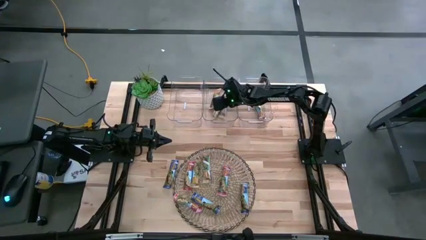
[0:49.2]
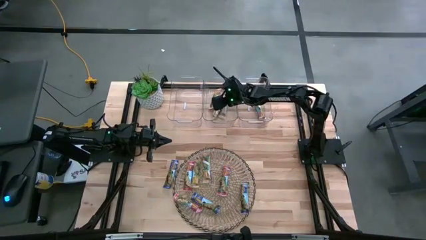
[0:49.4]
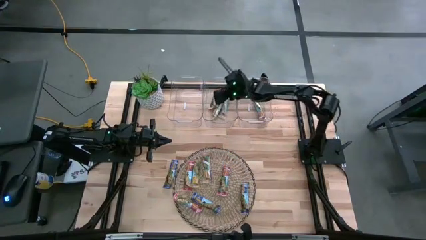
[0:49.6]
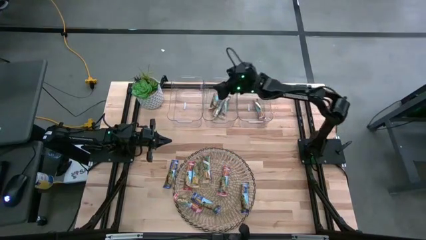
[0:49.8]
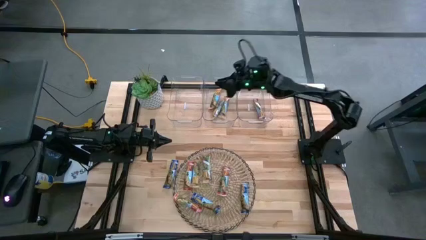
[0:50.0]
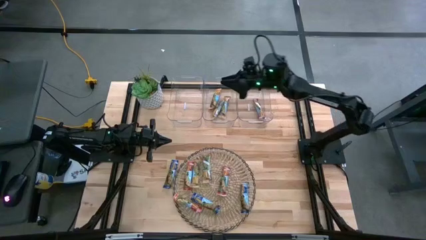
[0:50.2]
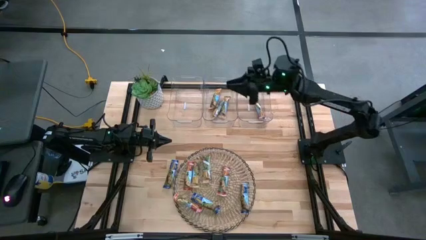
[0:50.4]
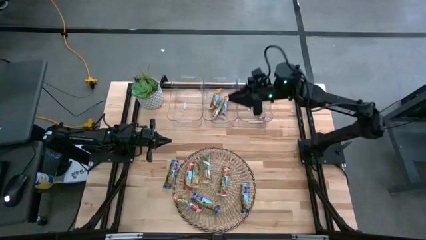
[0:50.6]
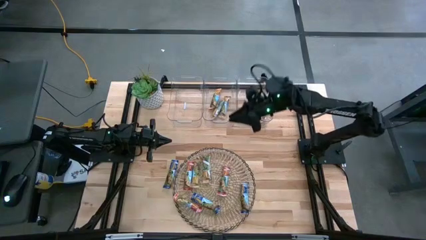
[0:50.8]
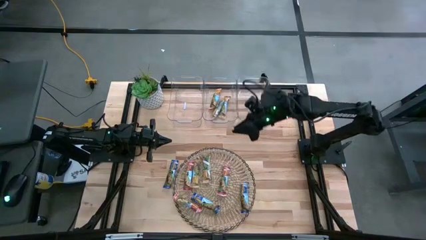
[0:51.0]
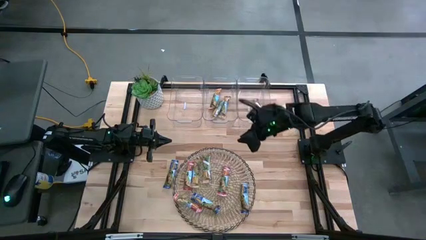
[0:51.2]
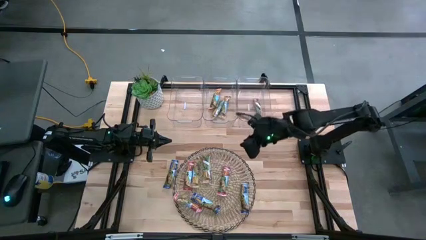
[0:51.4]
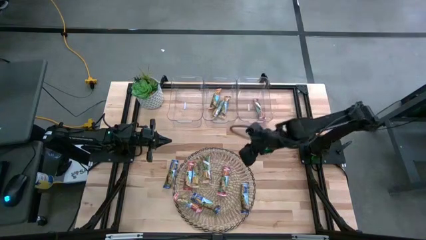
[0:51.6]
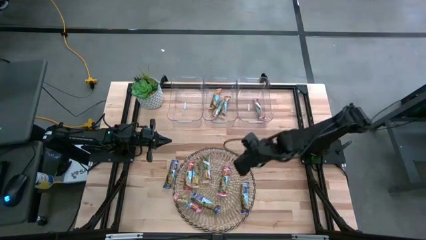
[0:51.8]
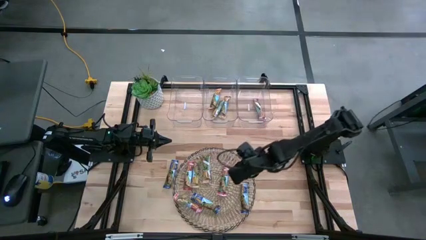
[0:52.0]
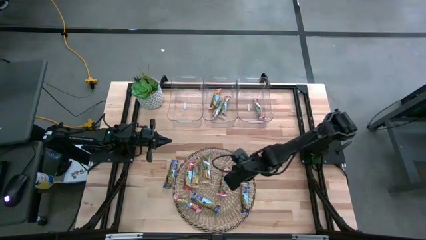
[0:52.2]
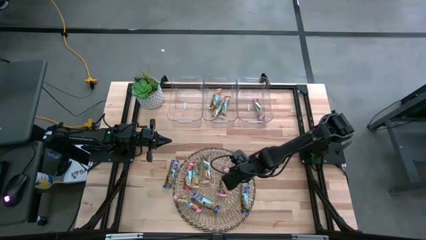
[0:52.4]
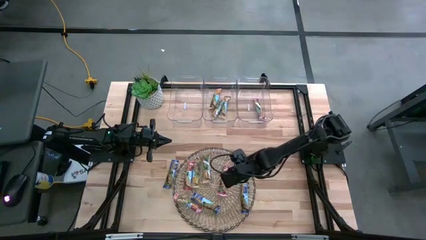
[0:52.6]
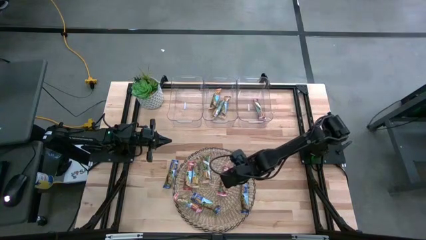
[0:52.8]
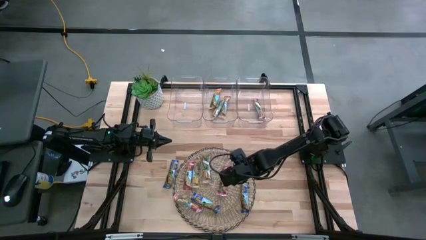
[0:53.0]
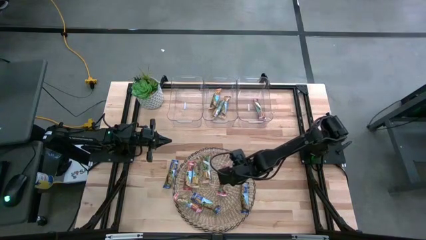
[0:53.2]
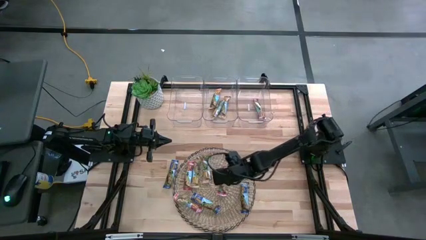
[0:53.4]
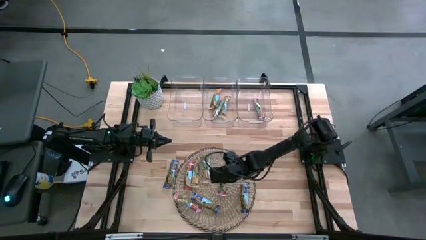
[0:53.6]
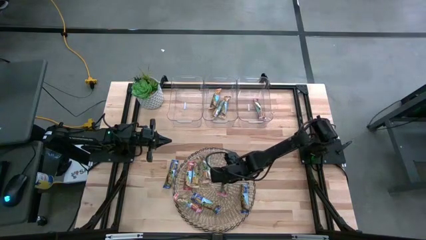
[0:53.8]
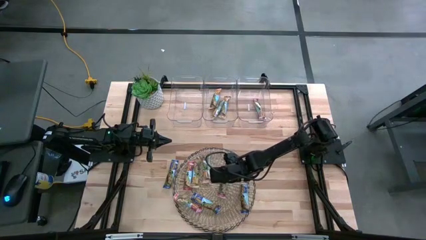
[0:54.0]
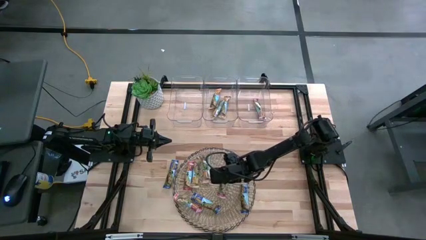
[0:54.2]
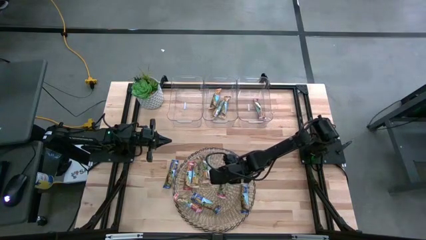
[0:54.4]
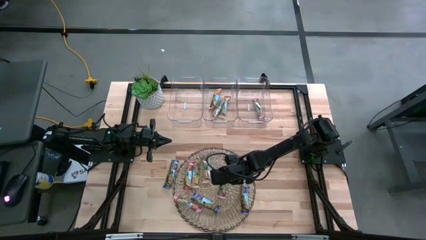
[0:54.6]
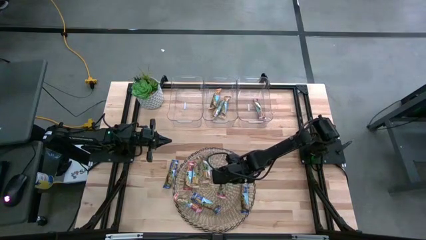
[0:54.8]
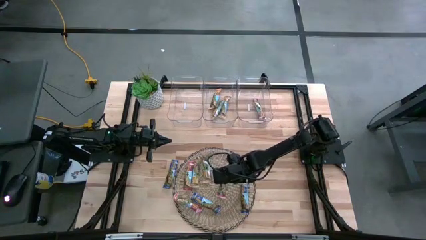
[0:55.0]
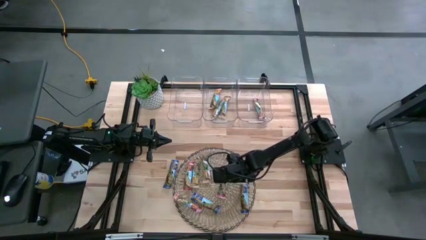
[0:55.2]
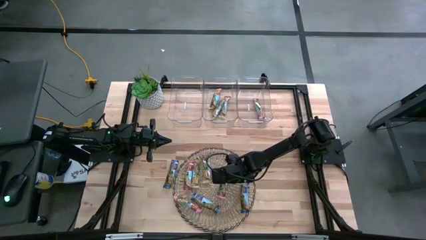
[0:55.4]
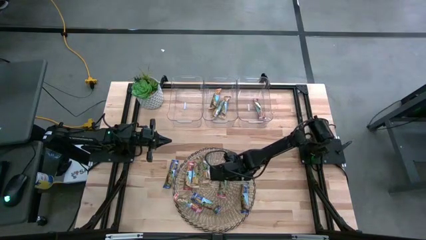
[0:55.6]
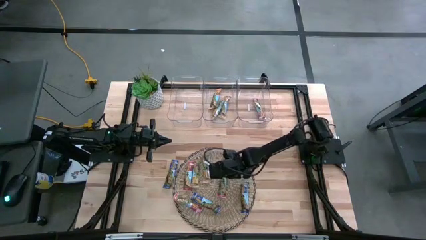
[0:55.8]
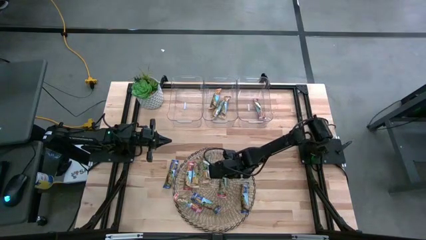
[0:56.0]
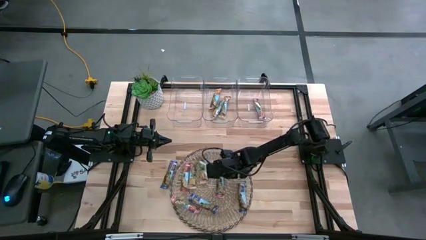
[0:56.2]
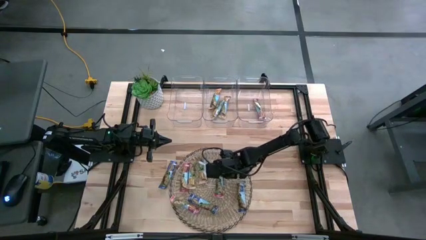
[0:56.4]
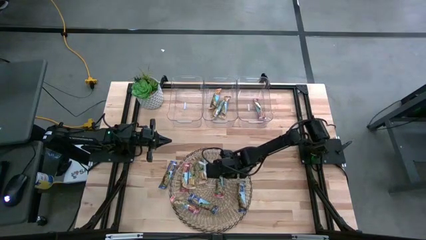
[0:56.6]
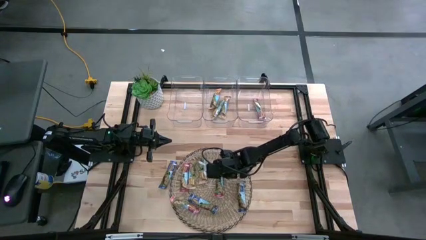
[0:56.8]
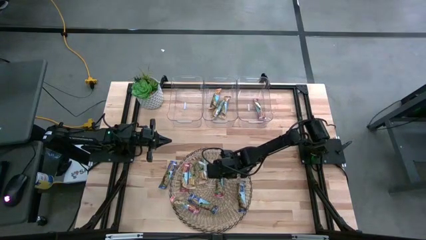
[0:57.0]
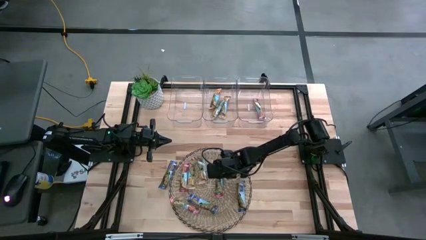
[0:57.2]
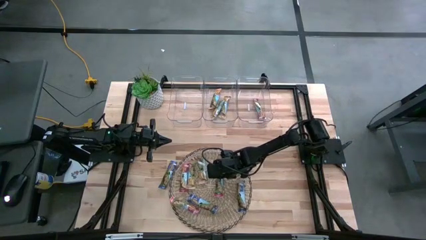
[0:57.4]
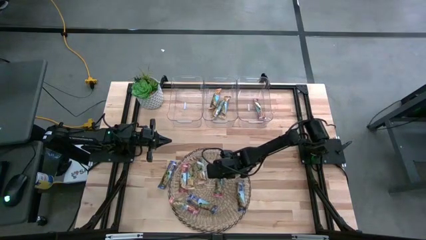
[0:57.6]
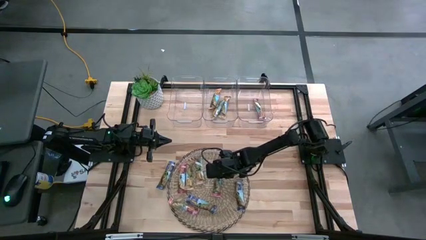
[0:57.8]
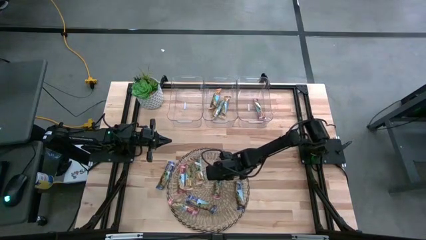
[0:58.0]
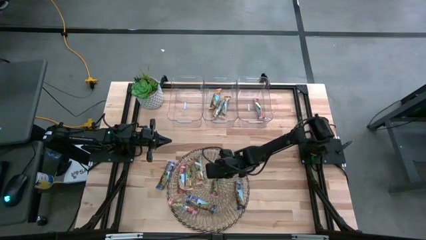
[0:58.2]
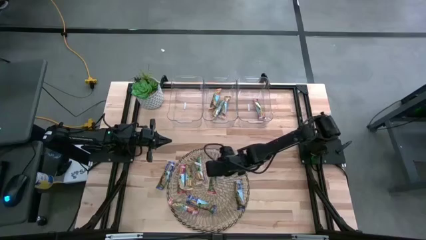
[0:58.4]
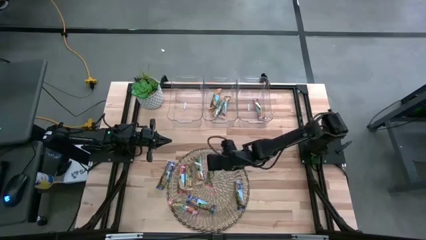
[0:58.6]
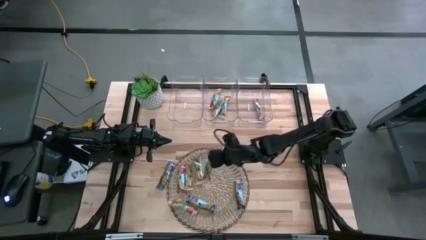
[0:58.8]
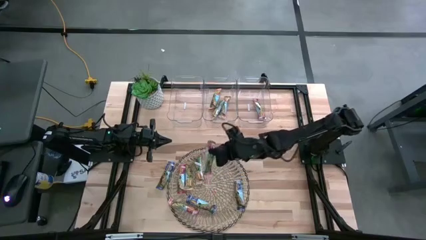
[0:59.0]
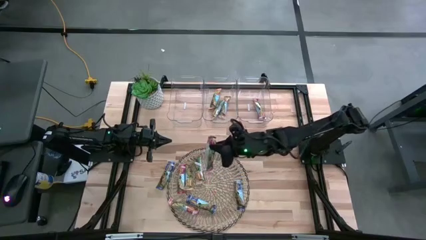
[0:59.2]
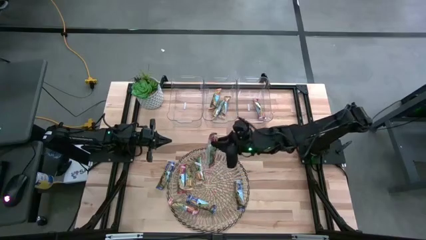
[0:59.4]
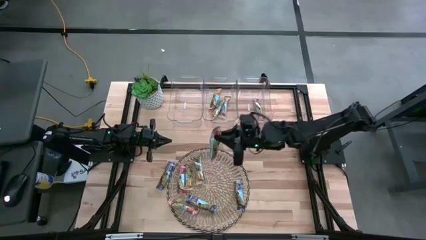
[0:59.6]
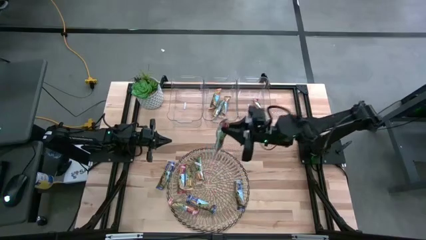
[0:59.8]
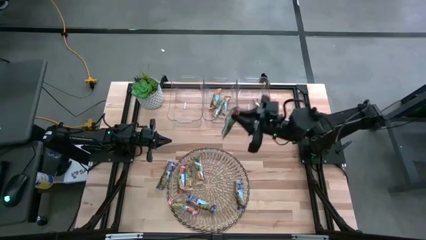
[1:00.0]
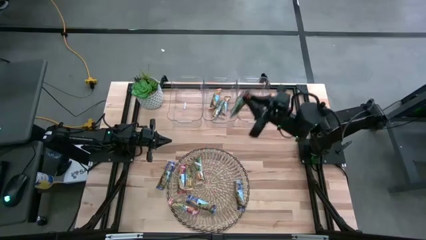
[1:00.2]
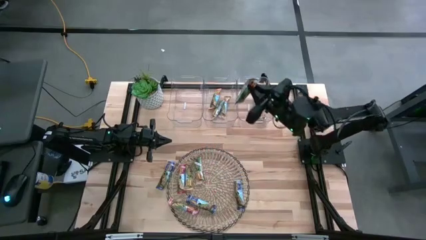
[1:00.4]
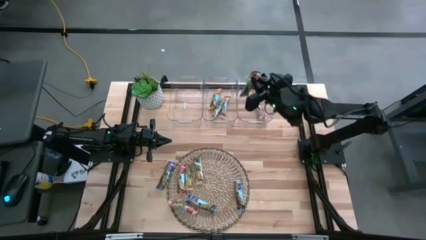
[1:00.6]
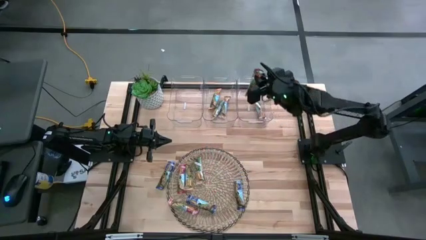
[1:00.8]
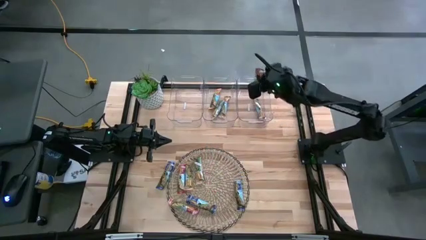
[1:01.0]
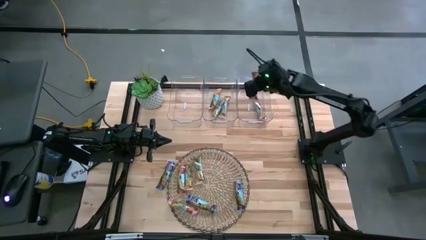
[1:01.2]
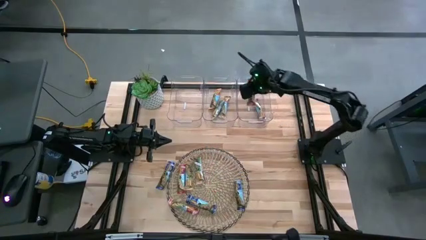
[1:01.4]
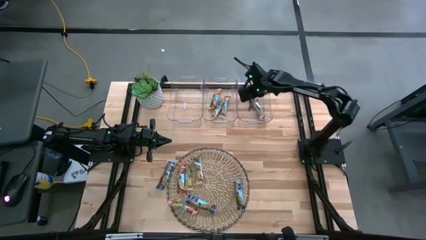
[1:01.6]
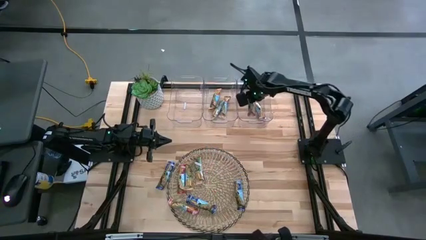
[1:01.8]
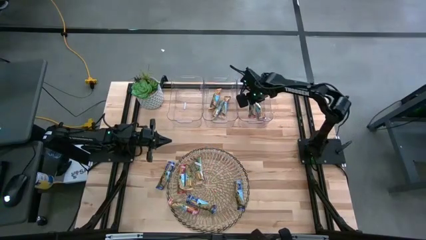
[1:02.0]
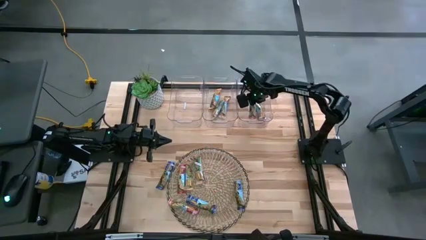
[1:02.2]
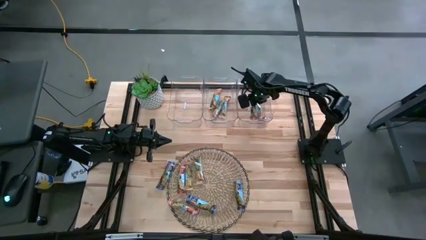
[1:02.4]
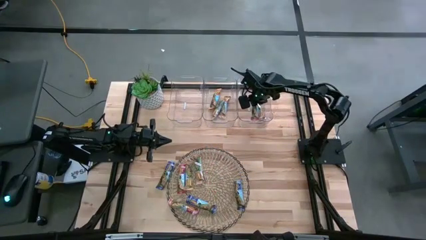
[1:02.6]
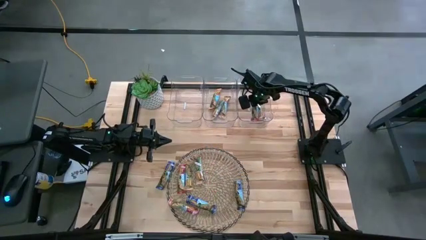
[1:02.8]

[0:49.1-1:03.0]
Task: Pick and place Granola Bars by type
Put the red granola bar into the right transparent bin

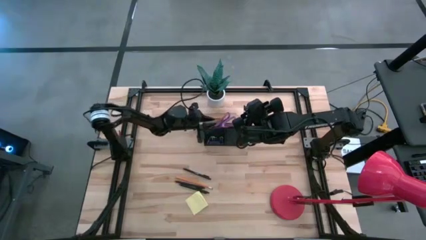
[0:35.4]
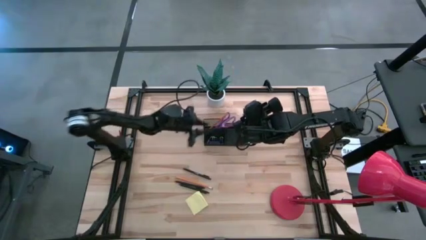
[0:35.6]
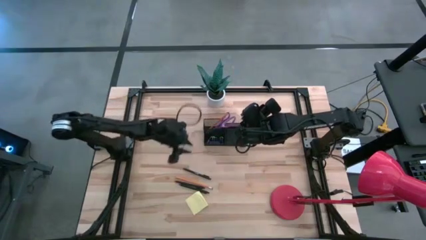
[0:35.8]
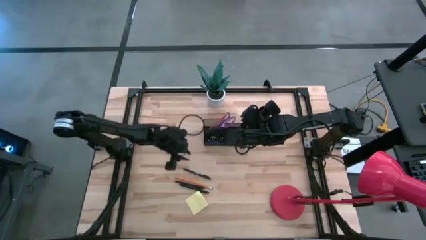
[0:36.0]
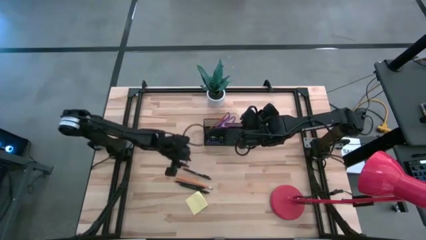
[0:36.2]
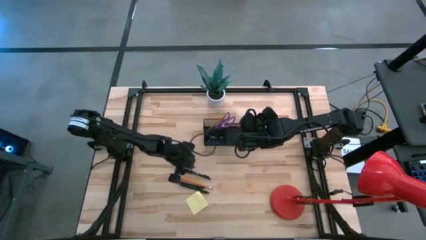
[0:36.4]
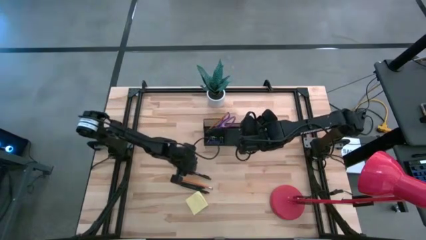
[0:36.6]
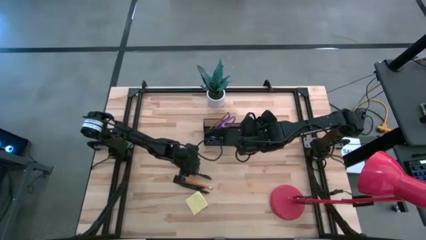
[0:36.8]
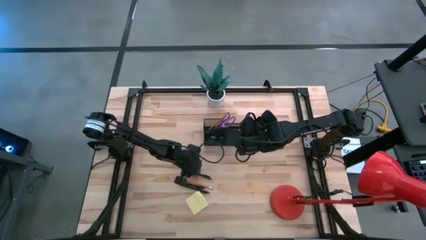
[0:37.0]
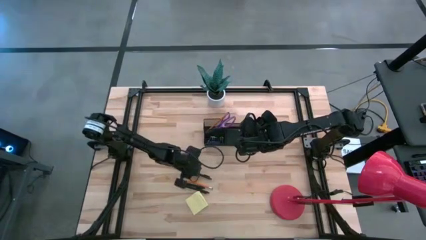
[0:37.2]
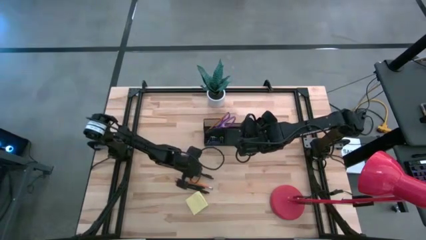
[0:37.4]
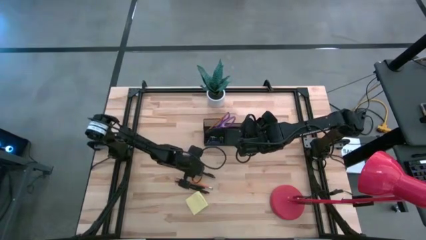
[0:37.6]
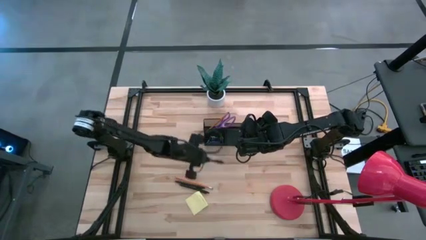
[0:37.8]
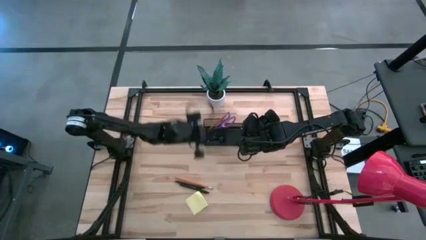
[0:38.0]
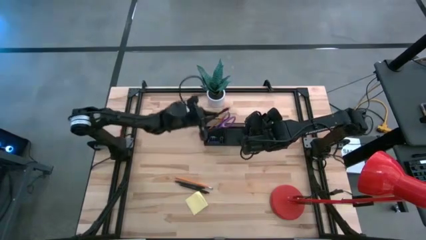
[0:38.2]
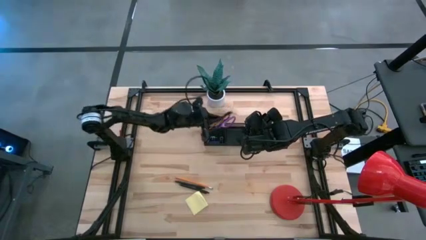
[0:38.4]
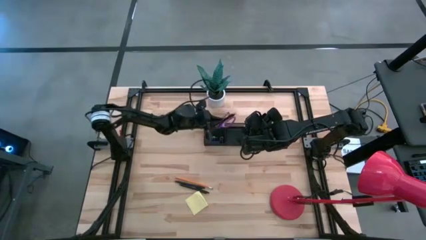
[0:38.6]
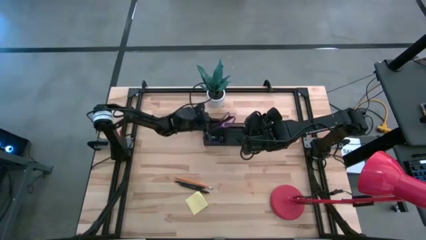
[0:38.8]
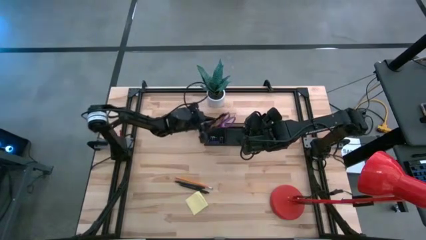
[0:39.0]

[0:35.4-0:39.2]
Task: Pick and place office supplies into organizer
Put the top black pen into the black organizer
